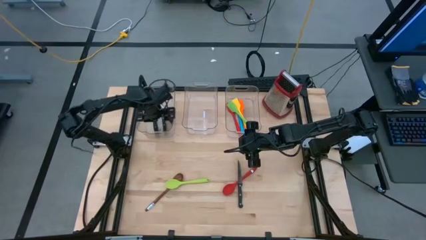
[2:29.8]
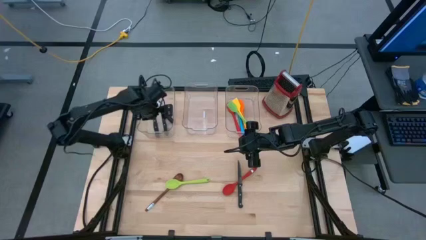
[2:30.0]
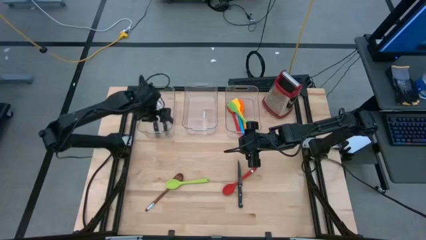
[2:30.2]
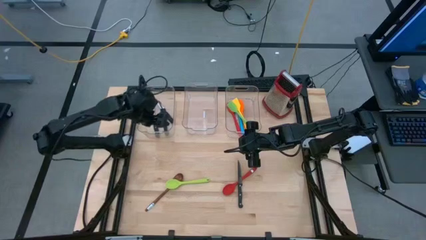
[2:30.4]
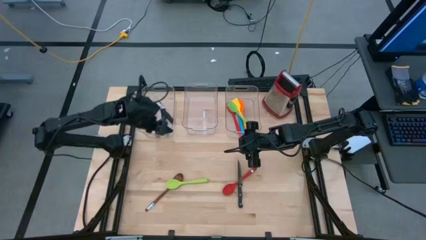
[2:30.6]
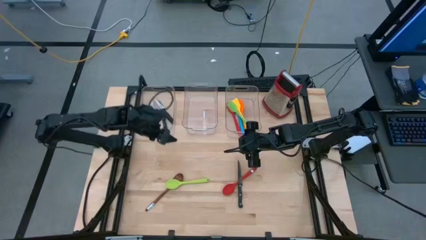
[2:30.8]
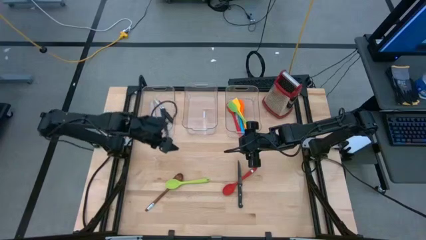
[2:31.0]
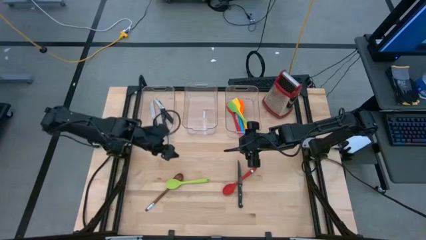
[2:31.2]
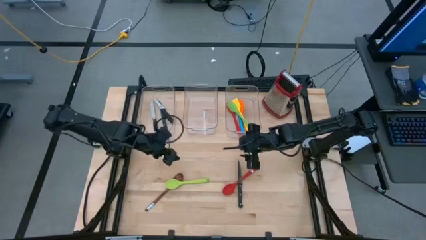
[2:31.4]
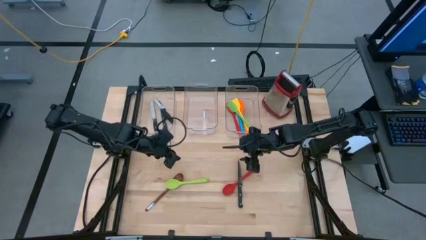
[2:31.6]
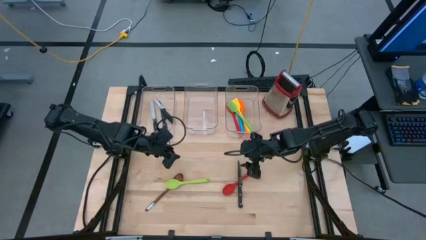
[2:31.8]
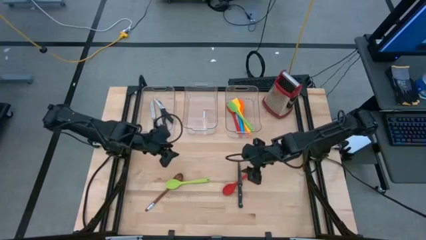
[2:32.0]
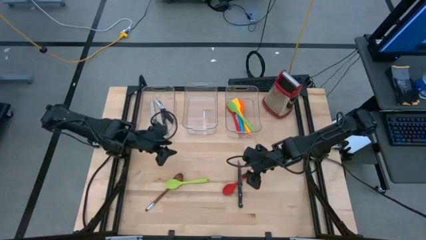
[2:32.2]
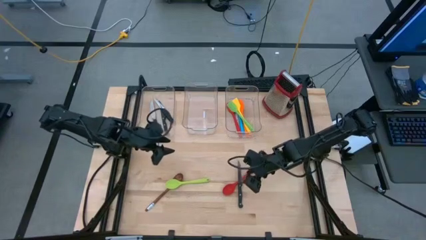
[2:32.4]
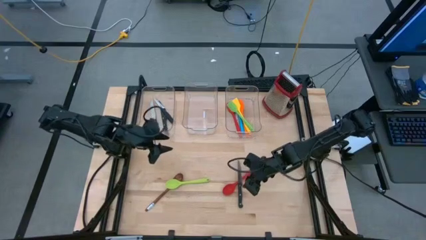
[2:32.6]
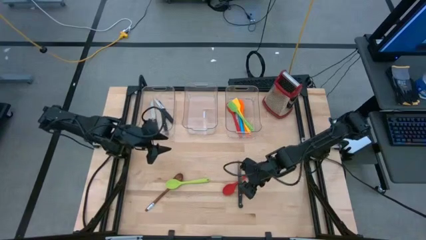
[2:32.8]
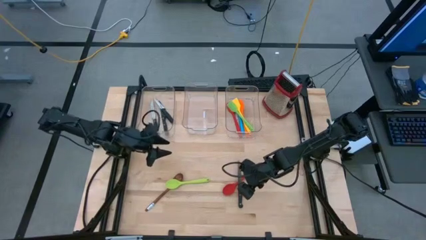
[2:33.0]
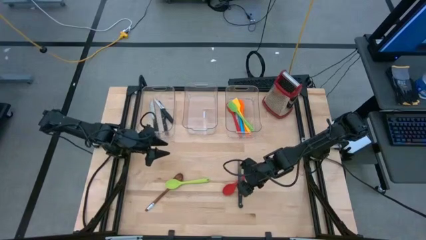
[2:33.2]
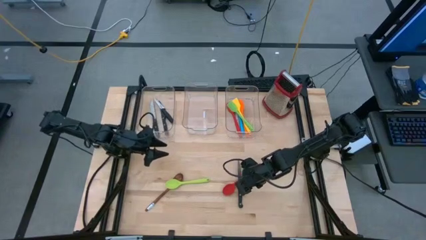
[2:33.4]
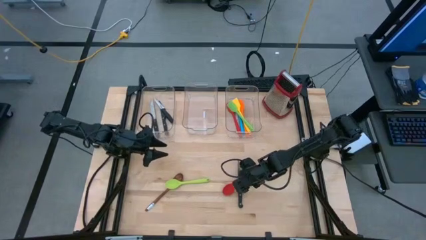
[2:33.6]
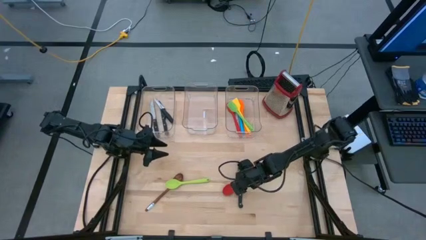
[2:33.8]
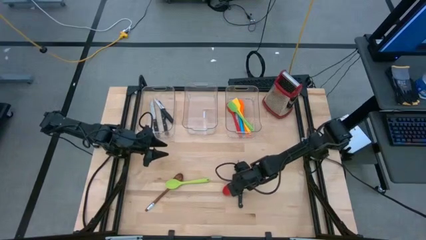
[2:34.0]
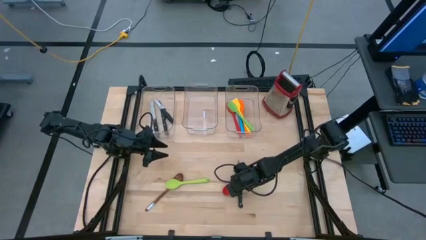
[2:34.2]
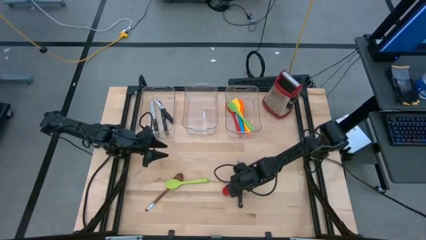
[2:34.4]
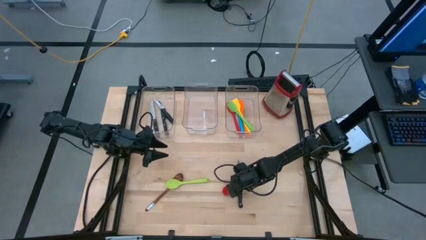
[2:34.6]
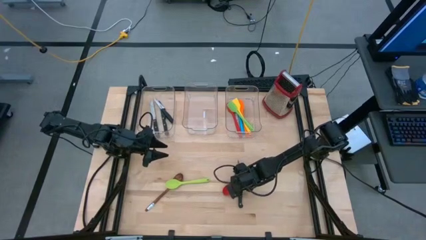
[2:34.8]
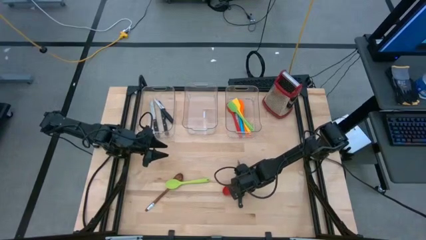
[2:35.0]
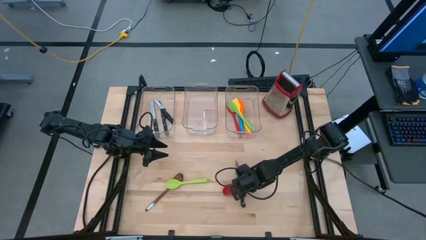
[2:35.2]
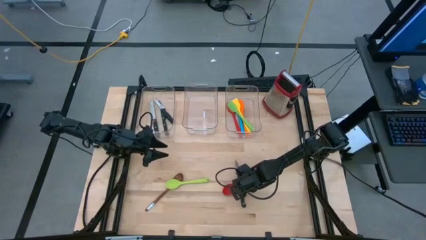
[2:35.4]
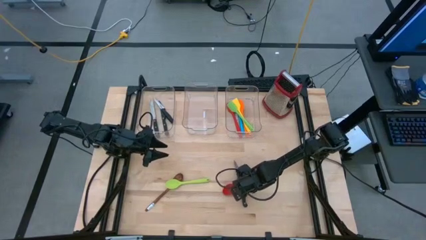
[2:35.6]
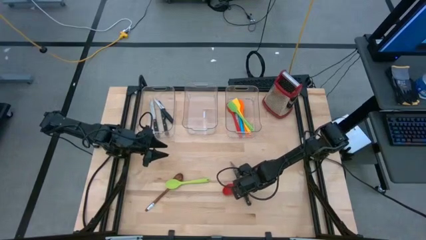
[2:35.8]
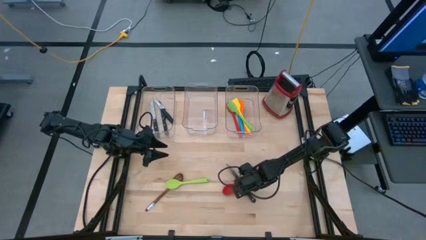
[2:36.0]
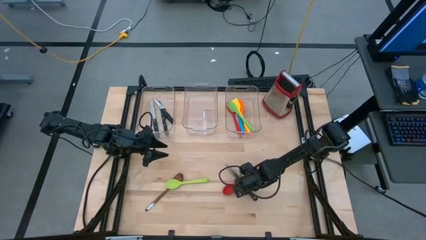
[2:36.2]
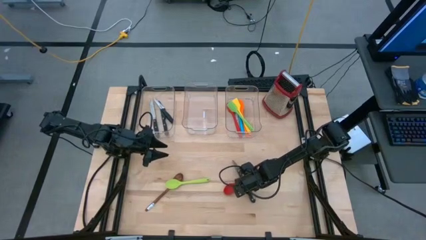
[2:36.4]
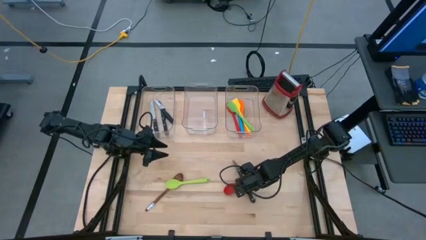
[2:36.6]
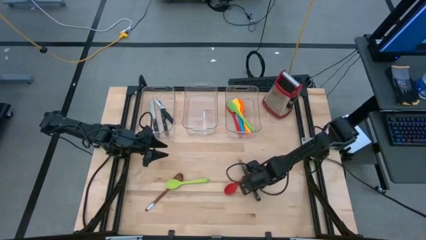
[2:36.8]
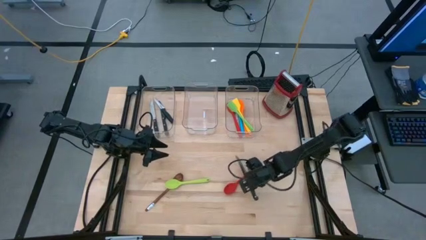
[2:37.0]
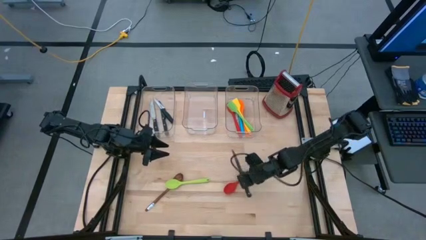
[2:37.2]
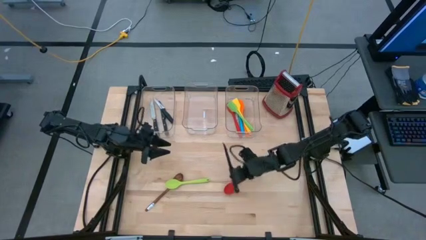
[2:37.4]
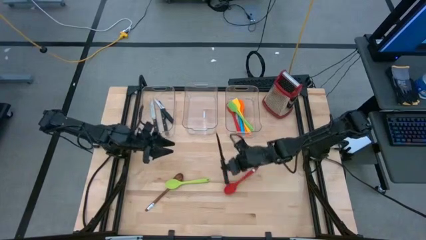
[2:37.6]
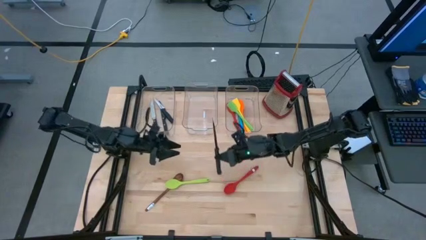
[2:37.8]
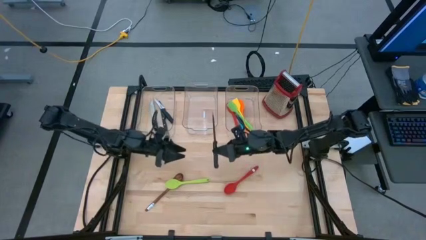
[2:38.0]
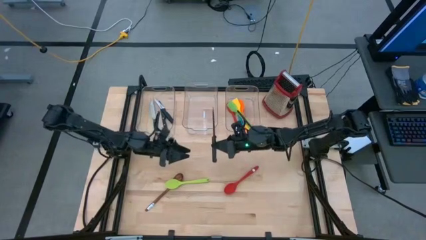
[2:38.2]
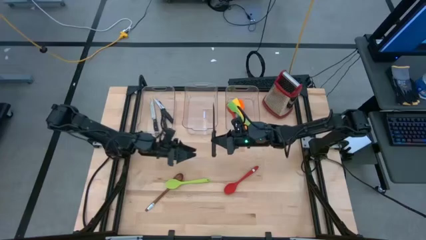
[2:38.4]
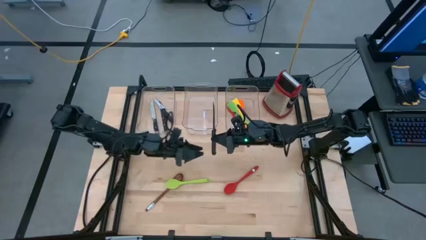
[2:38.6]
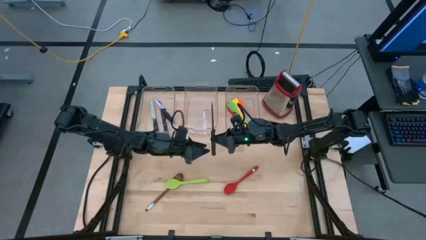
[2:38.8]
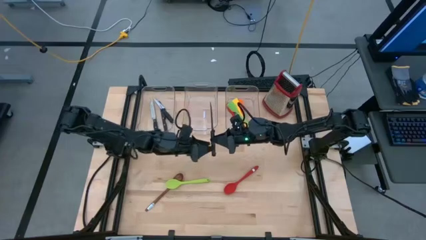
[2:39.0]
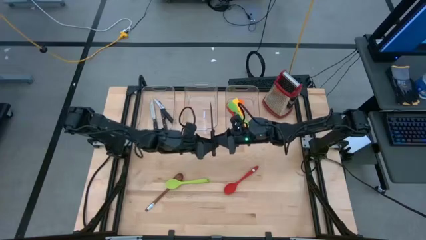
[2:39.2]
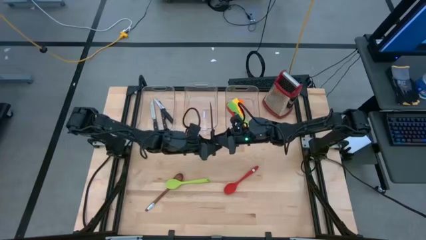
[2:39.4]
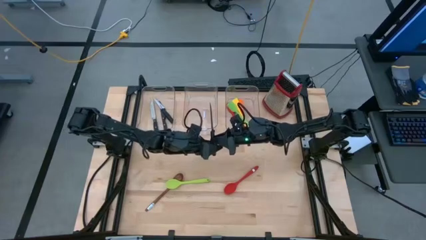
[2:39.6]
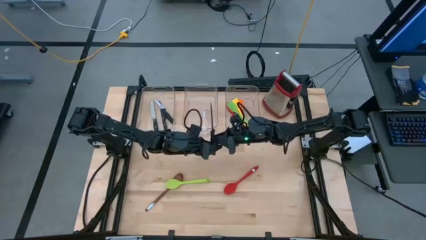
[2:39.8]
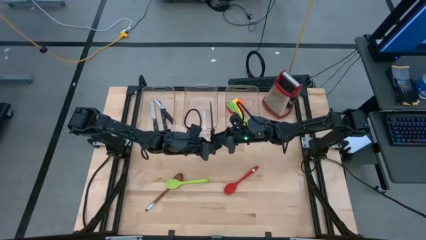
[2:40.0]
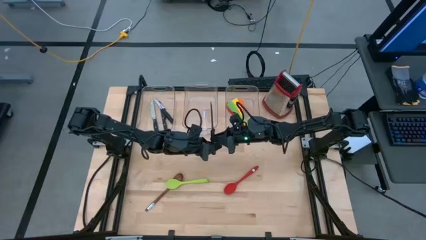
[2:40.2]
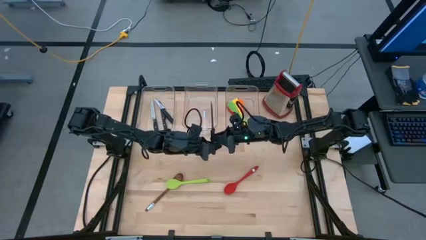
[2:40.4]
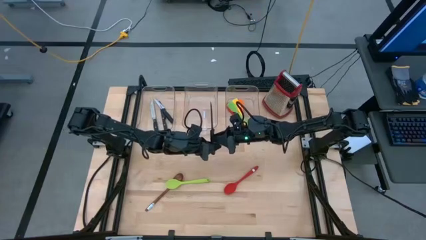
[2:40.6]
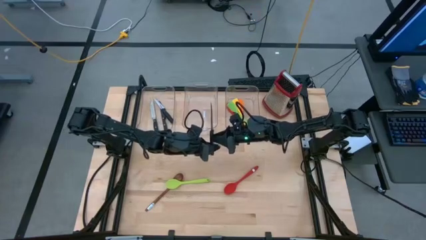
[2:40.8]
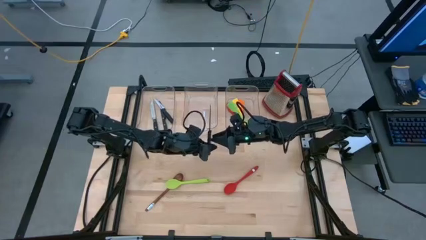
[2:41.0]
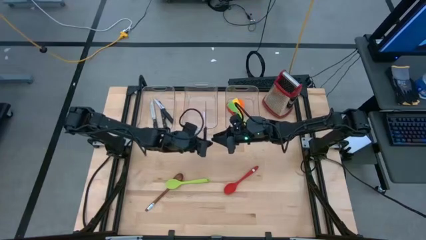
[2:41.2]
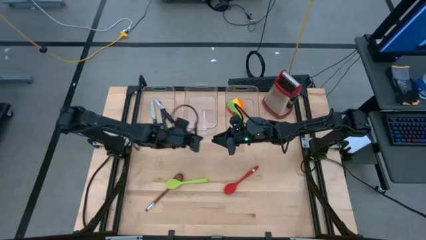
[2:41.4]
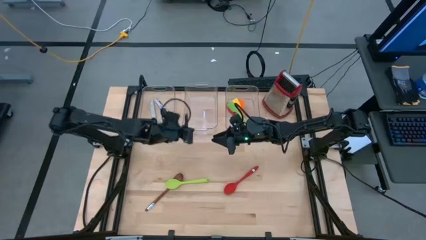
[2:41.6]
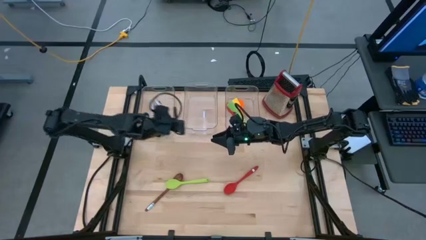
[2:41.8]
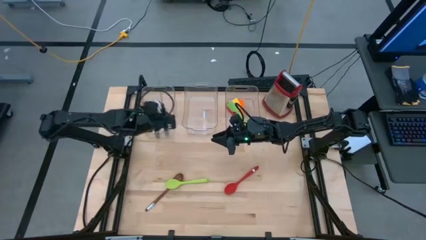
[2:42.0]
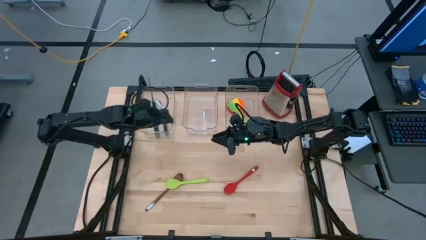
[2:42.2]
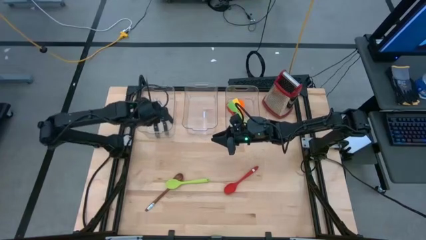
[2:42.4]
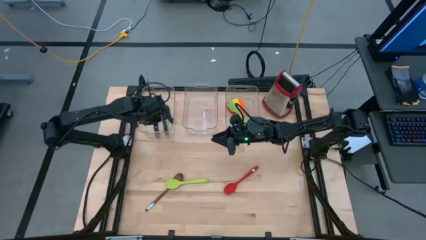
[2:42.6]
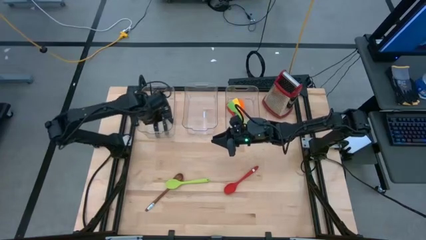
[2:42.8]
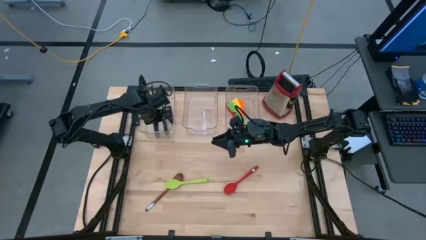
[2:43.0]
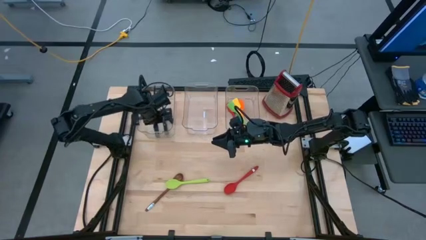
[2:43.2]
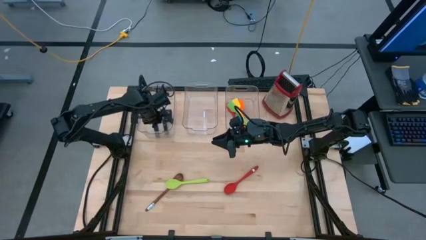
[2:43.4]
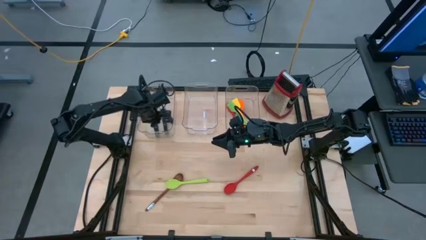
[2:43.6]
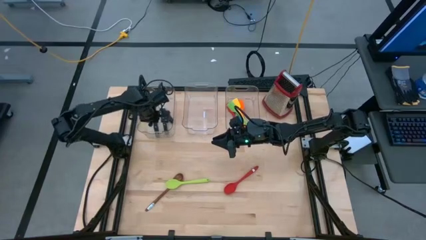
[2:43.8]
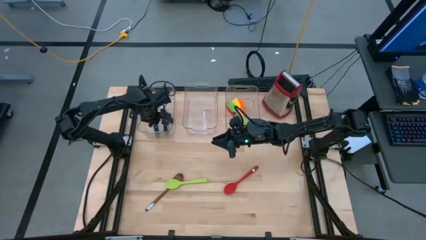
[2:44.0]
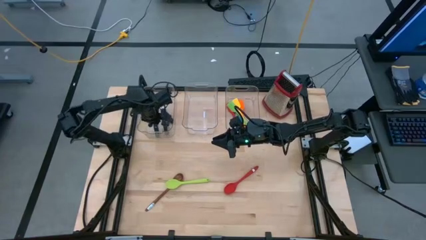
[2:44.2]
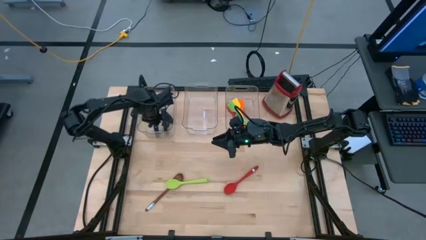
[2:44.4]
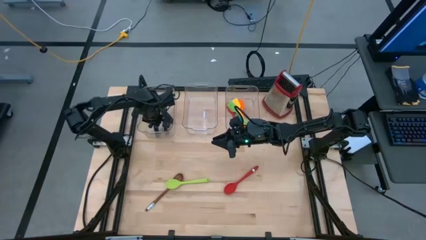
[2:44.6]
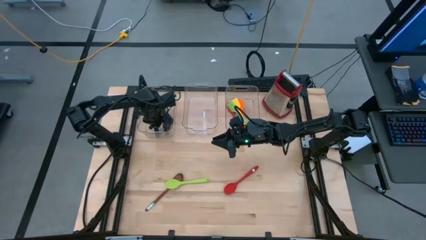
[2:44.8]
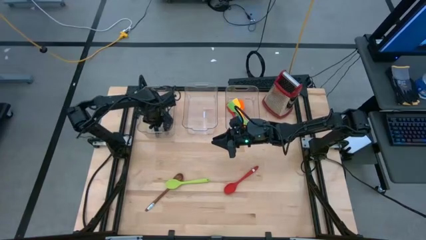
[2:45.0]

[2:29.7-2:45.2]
Task: Pick & Place Kitchen Items
Put the black knife into the left transparent bin
